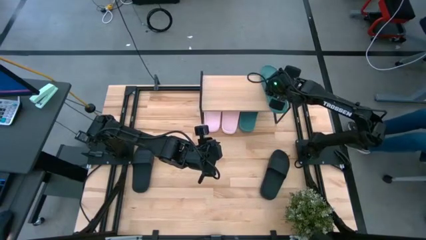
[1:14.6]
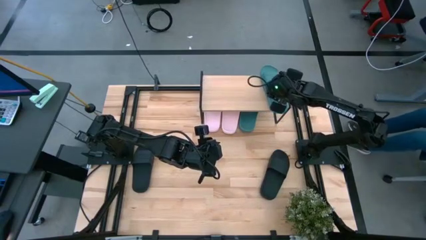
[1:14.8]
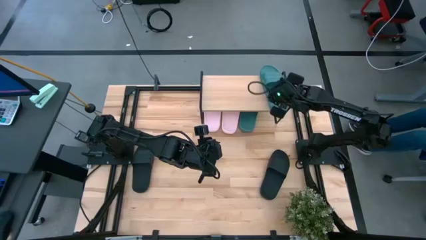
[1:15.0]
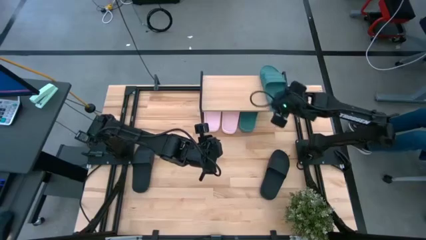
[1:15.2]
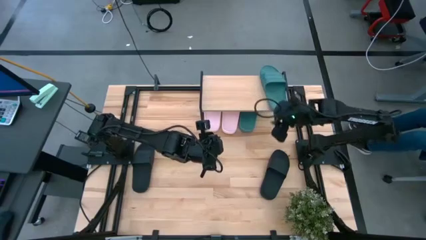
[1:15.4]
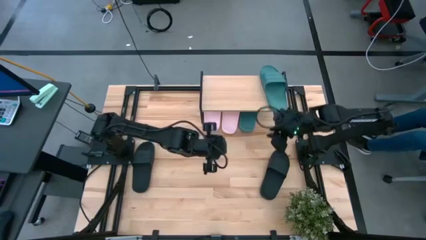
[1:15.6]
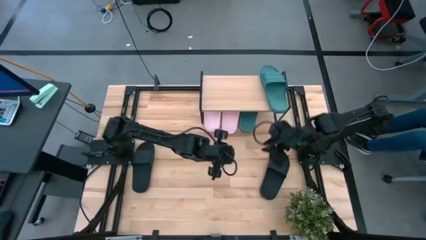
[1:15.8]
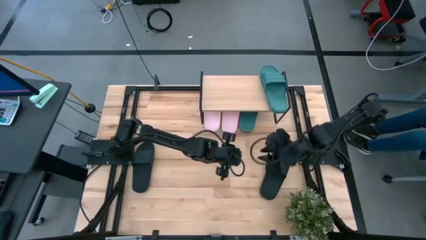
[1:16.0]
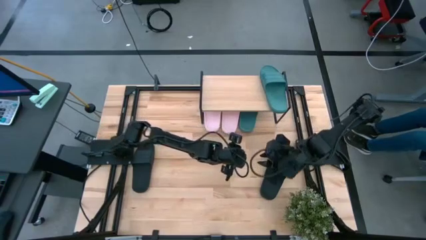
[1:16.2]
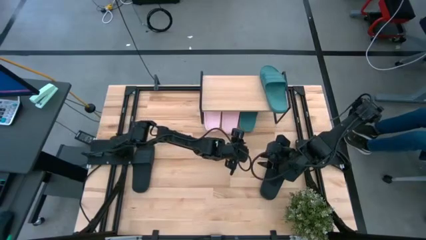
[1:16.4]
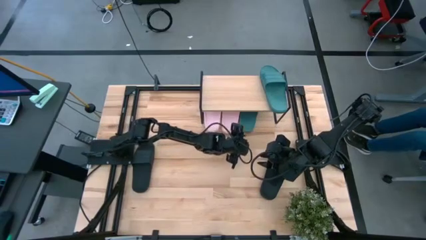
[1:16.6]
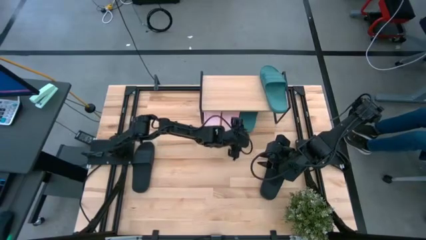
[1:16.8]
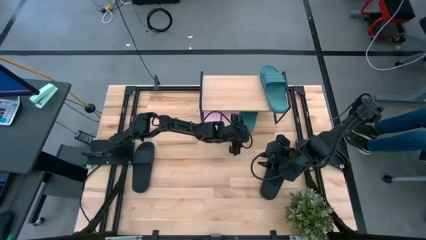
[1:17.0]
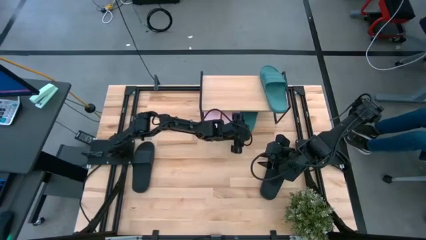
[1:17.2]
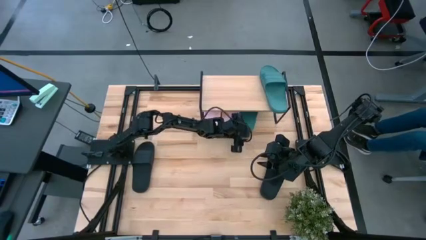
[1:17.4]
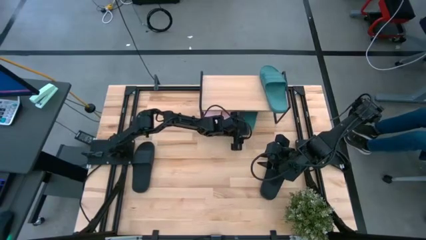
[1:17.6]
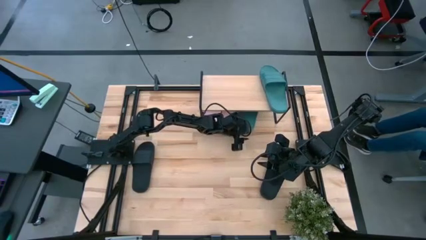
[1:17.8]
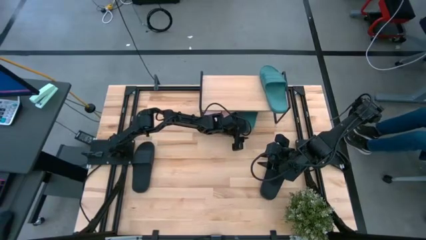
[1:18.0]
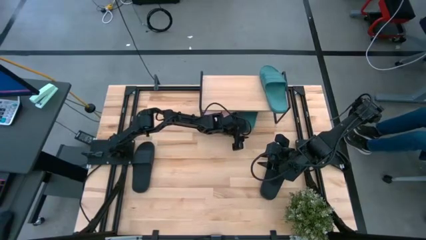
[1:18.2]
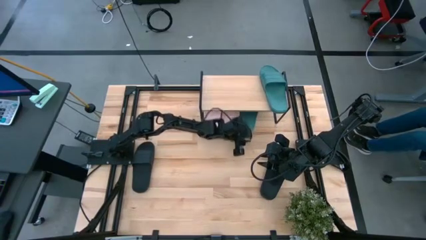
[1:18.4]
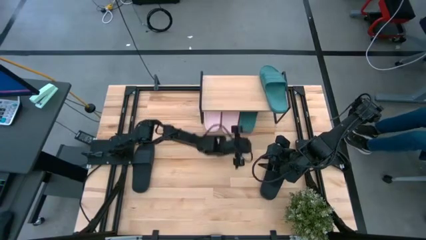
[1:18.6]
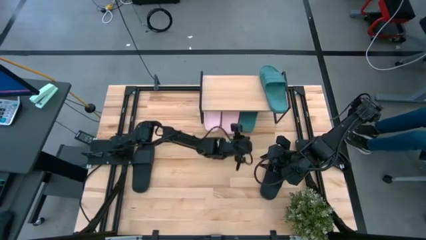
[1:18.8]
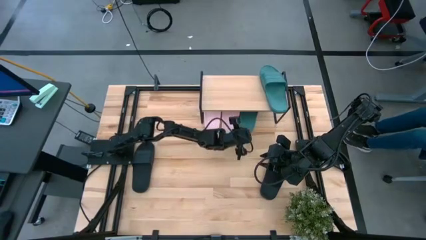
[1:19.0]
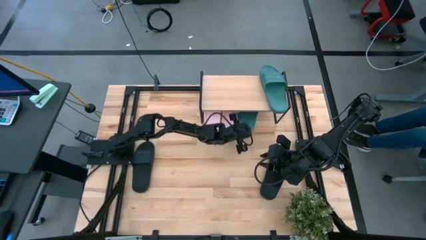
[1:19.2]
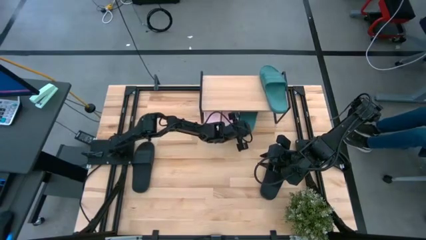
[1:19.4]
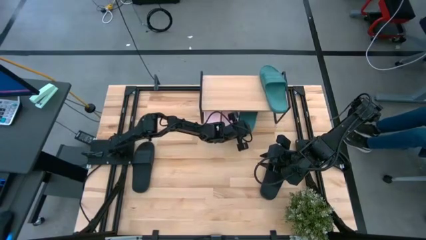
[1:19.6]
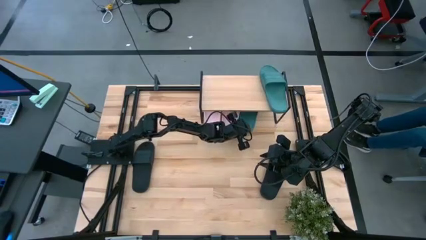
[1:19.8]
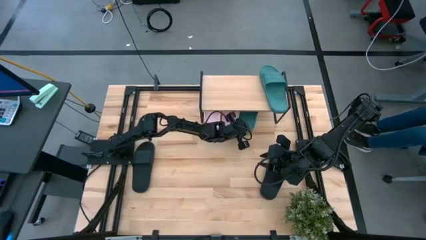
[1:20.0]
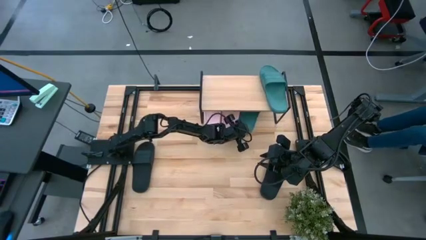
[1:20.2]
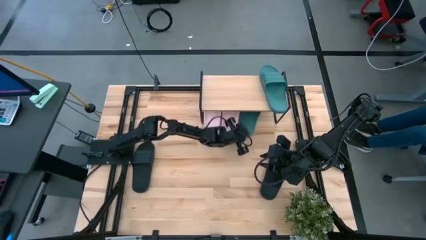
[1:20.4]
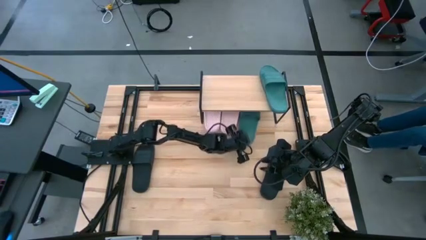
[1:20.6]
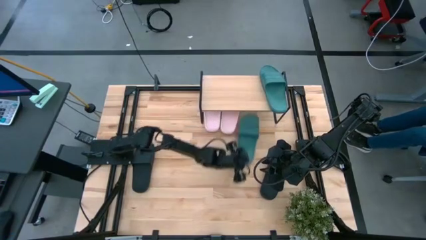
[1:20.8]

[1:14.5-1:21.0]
Task: Pick and place slides into the shelf
Remove the left dark green slide from under the shelf

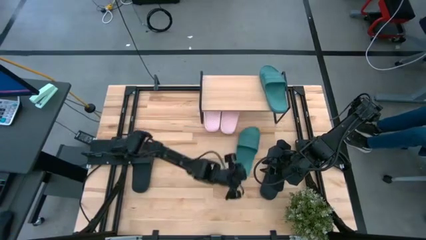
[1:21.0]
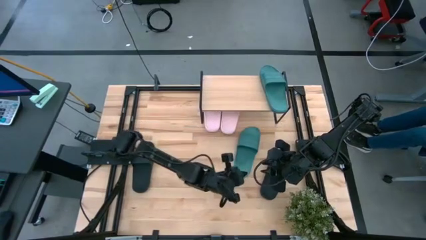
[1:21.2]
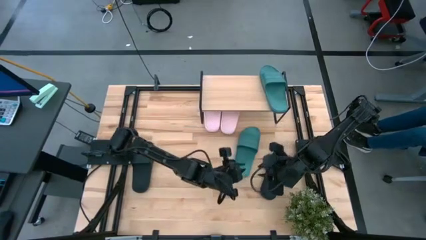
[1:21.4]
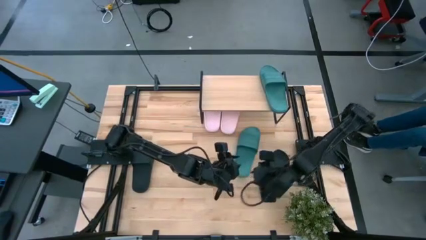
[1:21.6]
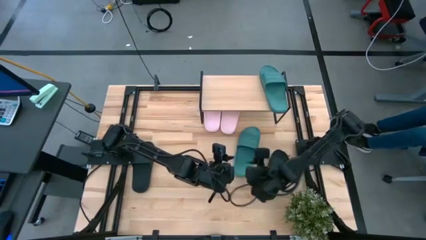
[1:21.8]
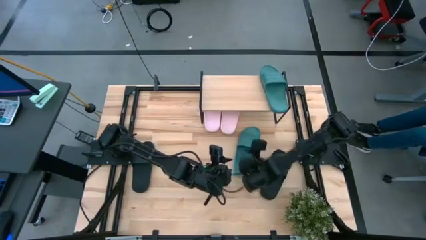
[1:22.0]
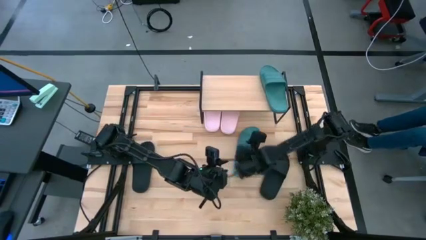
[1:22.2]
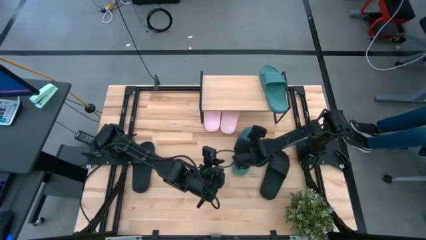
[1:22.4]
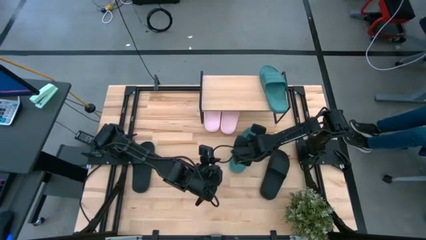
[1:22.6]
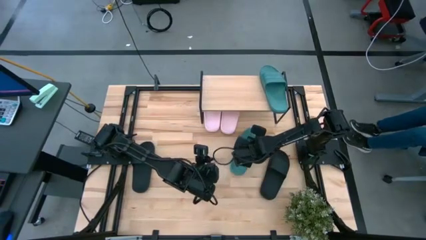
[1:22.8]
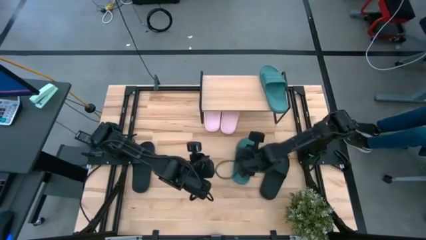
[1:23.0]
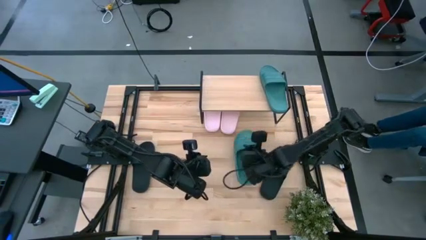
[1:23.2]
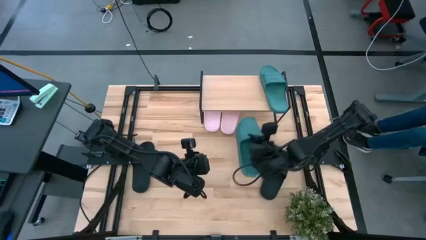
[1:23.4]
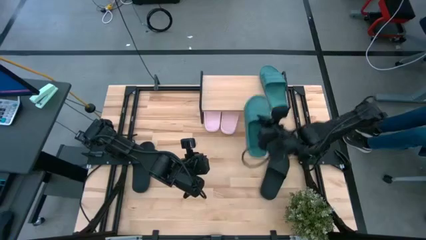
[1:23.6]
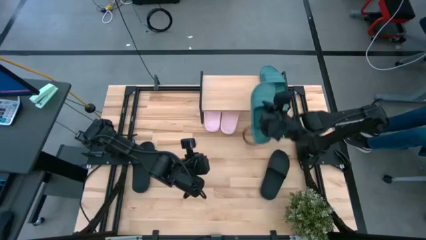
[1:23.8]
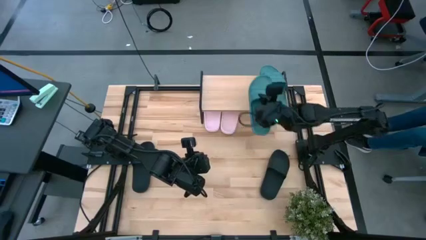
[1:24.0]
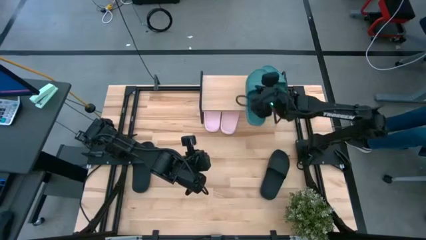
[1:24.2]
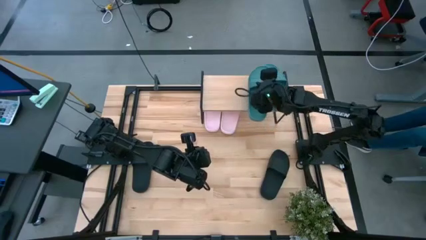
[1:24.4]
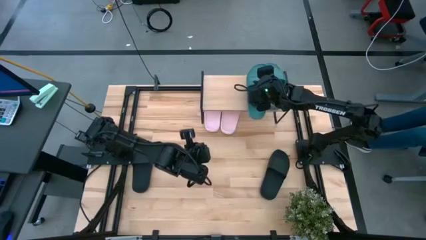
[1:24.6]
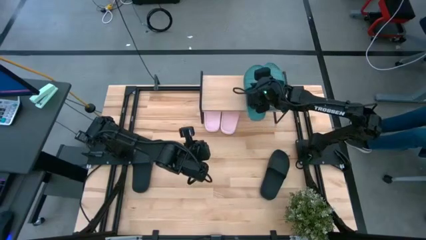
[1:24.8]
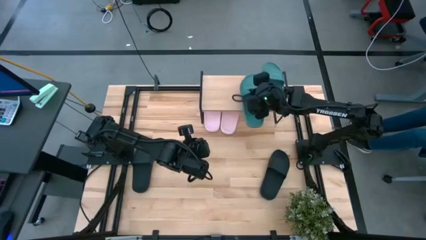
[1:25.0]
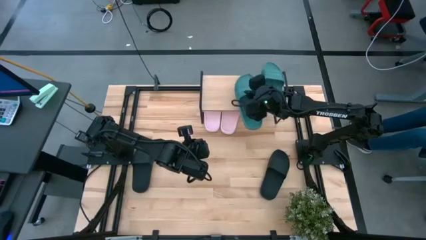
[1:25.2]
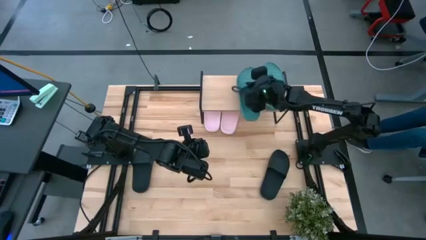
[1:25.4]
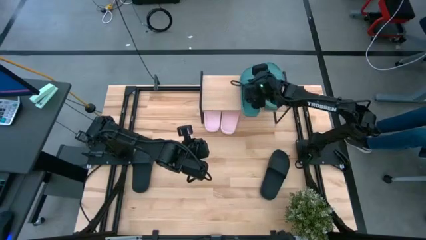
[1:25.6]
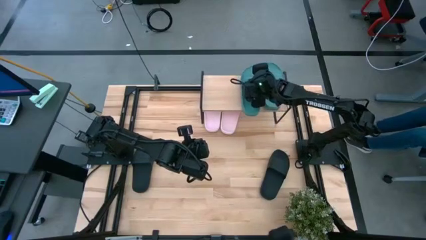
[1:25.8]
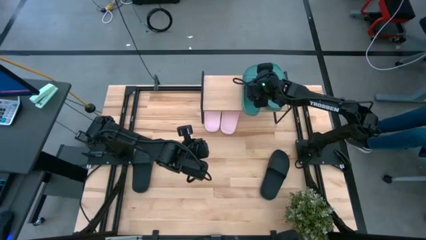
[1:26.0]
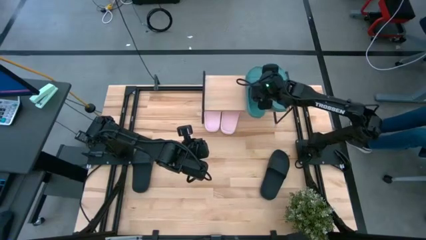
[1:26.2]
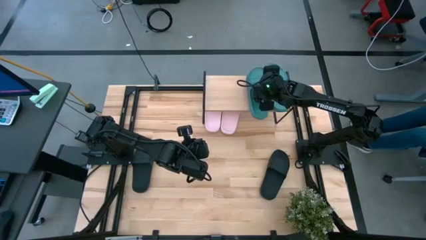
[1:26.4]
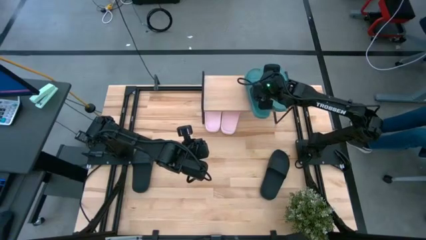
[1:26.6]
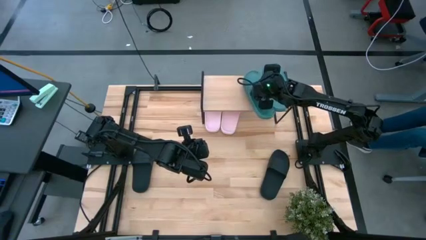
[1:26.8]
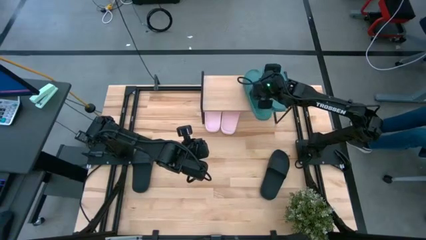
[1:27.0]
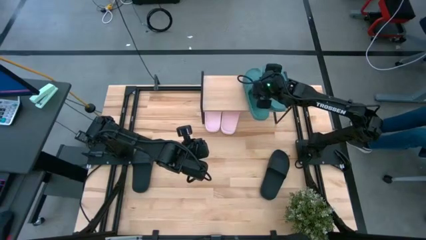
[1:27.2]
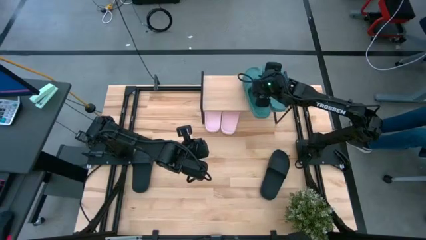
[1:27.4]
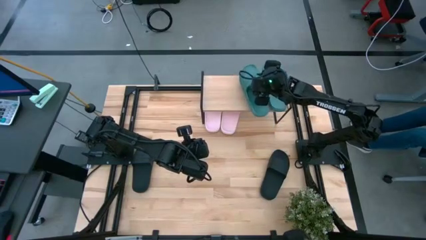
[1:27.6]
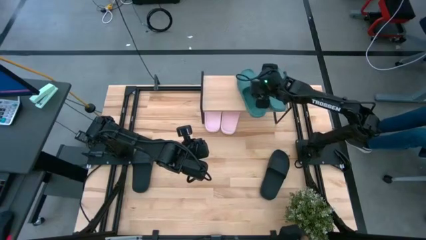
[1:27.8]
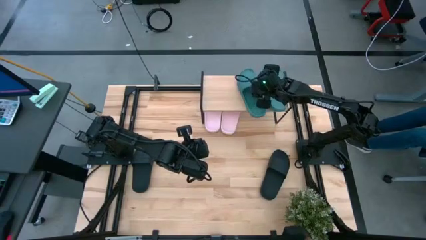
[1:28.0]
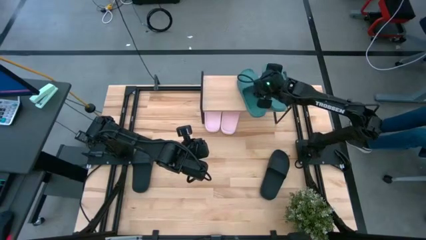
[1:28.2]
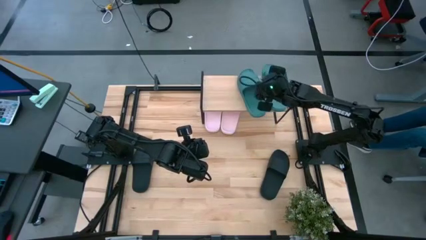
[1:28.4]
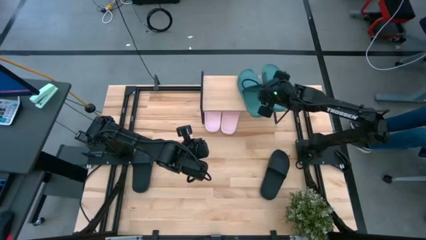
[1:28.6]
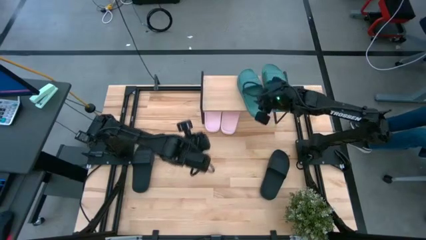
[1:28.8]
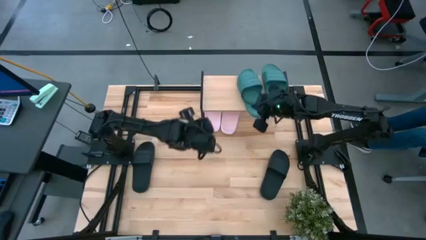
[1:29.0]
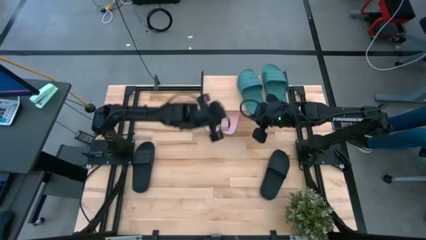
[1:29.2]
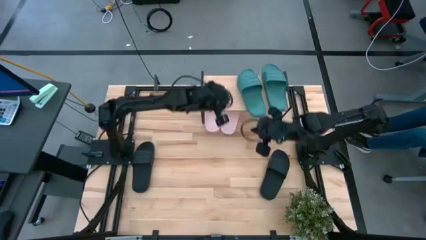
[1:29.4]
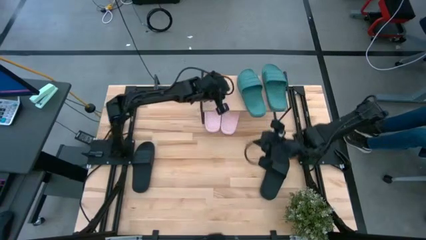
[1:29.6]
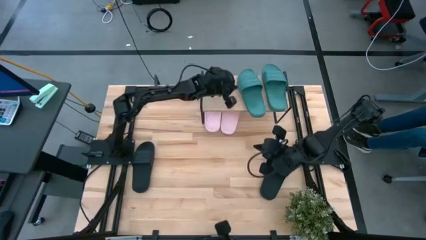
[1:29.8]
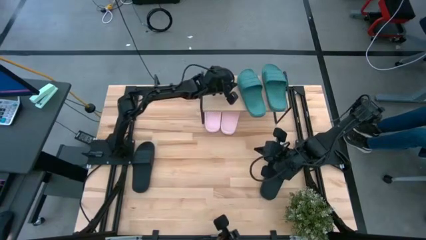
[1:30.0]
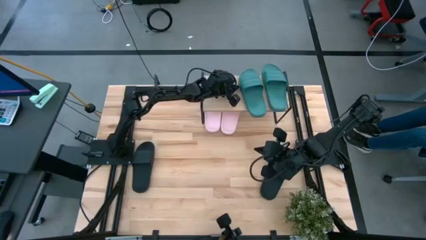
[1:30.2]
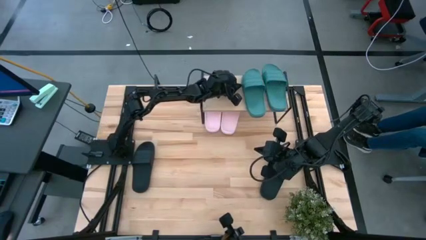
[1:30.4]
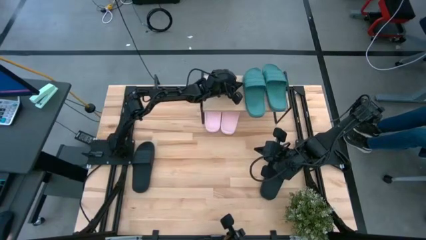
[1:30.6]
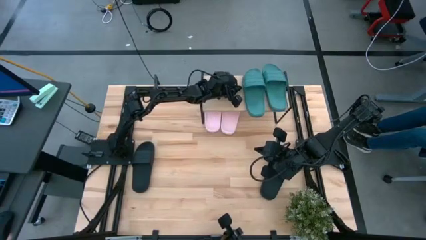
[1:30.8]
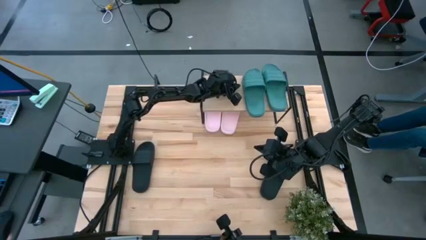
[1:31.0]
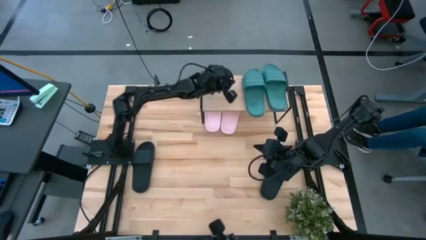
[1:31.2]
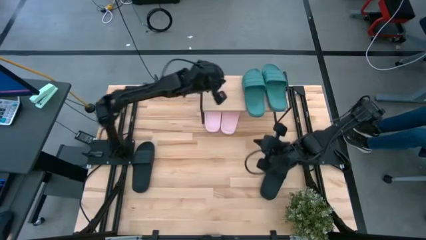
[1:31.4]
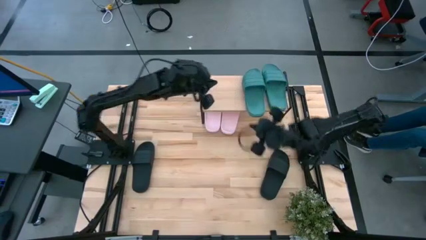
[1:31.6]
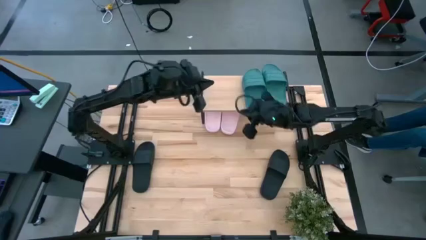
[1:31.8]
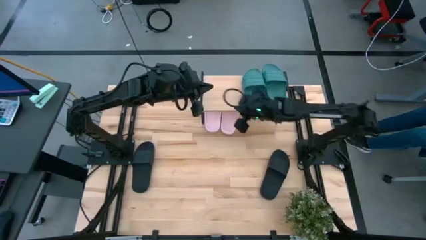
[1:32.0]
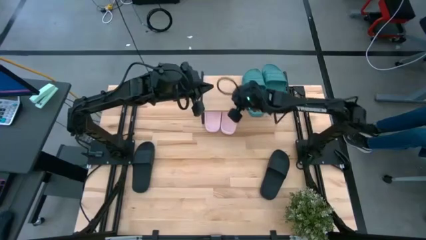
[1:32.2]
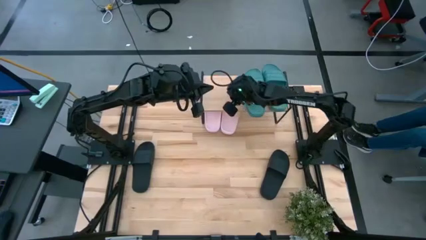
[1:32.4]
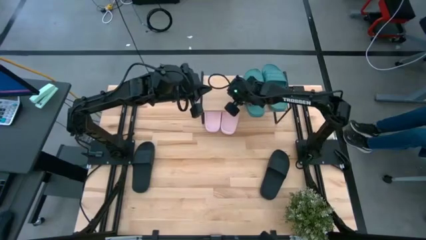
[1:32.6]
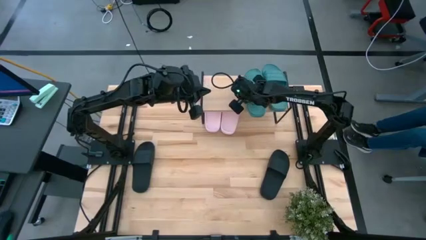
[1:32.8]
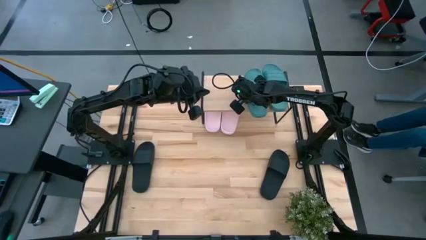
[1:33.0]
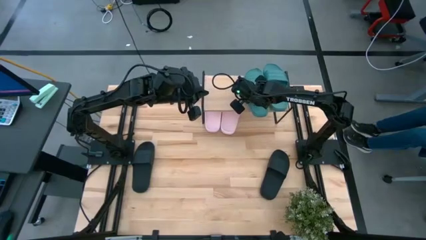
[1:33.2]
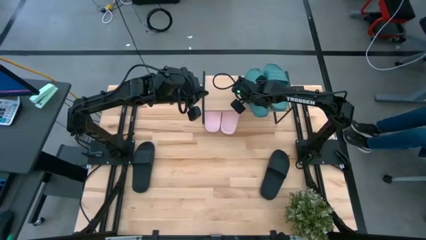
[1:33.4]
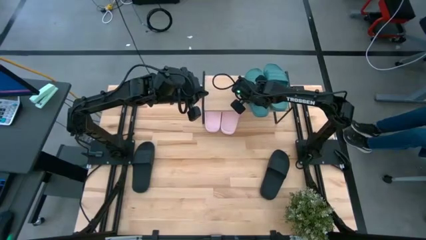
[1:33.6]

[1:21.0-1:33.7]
Put the left dark green slide on the shelf
